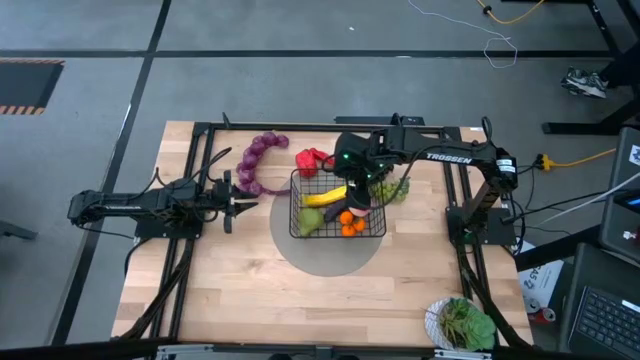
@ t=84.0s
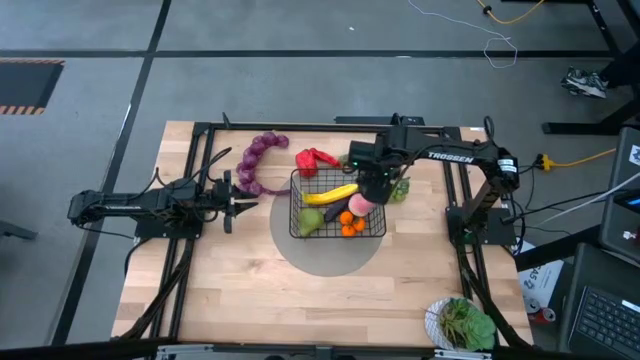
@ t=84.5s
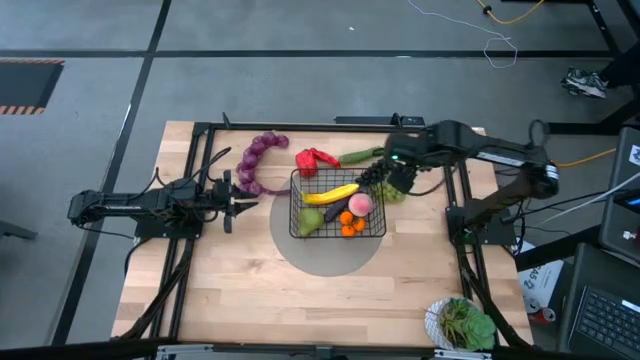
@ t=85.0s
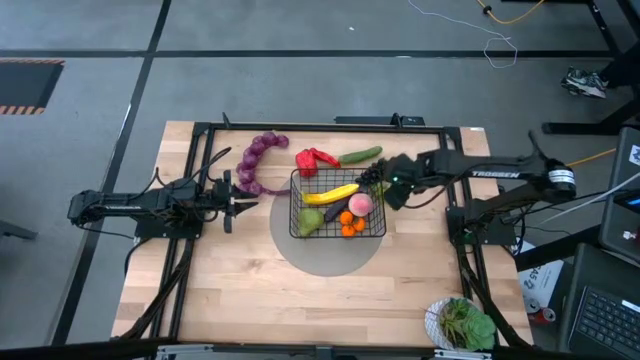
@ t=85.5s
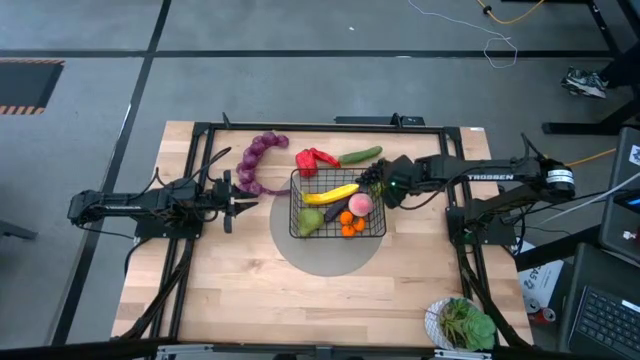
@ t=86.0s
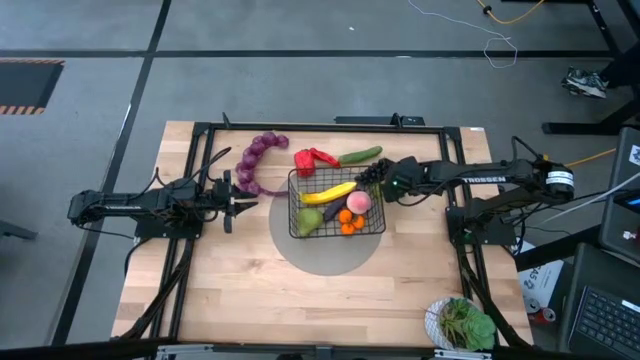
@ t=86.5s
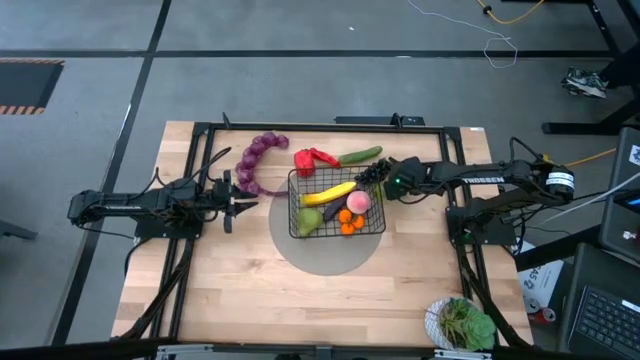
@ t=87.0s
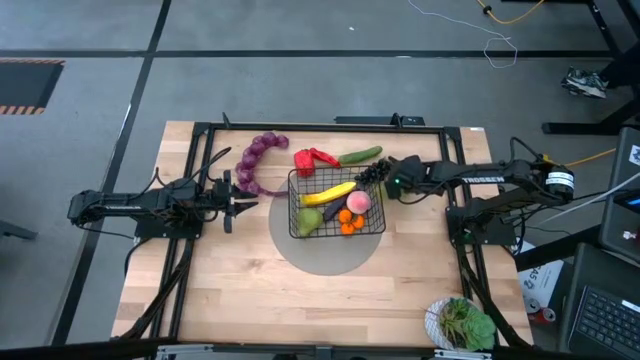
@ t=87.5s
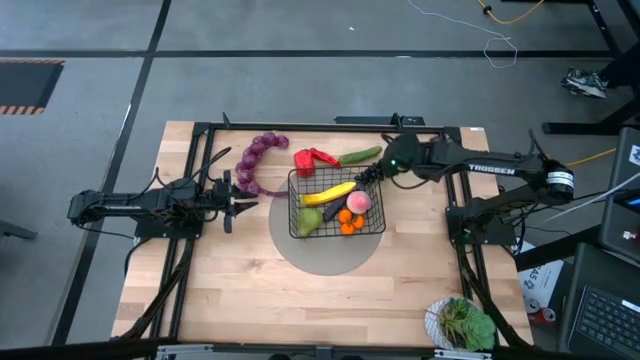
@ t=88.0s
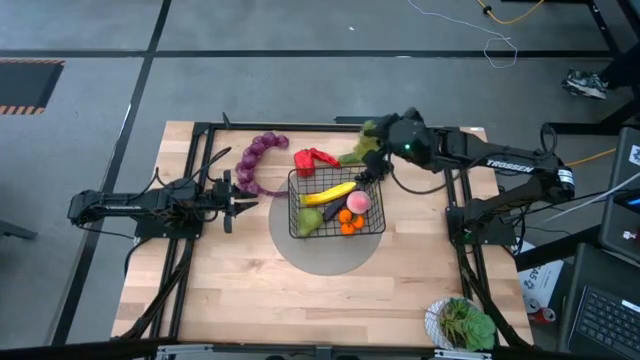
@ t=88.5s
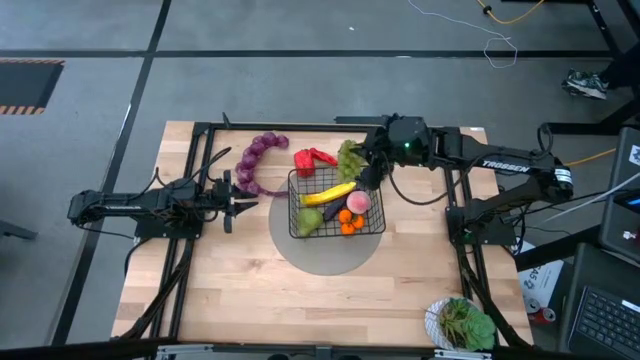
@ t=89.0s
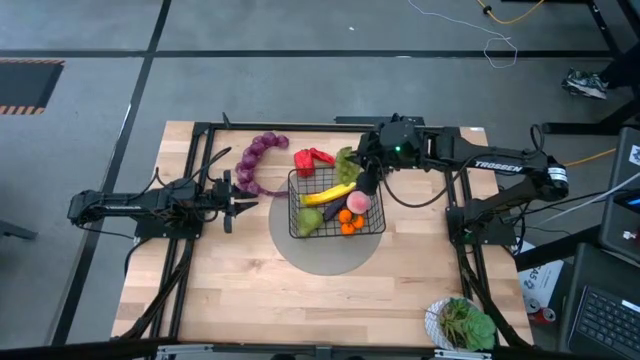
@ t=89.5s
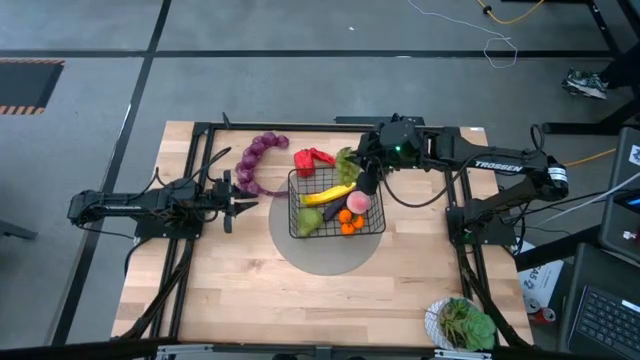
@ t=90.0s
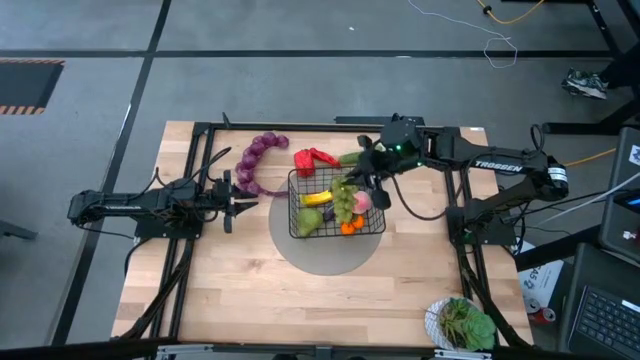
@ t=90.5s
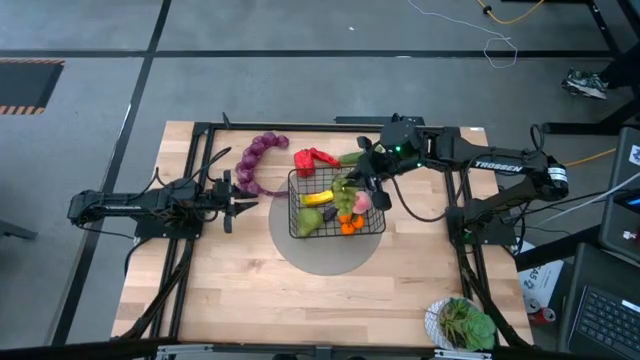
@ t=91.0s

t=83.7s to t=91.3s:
Task: Build produce basket
Put the green grapes into the wire basket

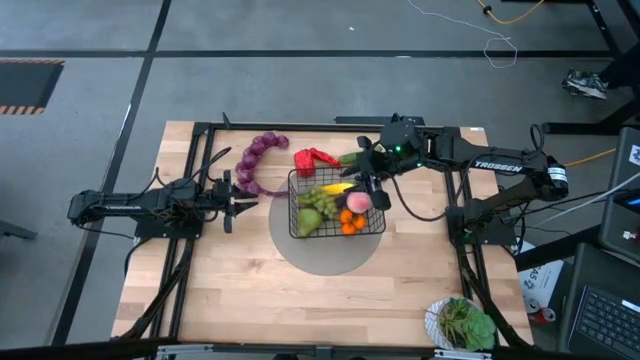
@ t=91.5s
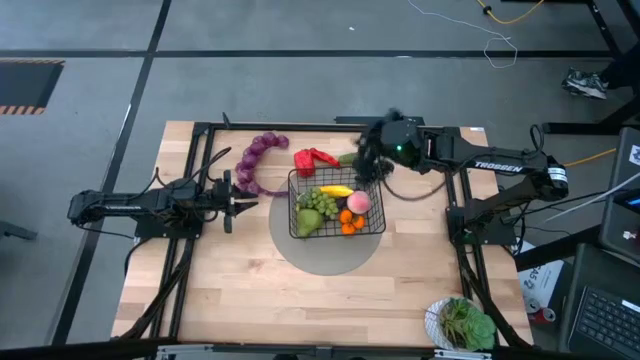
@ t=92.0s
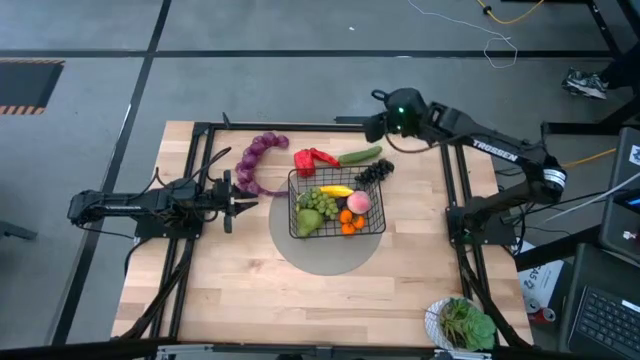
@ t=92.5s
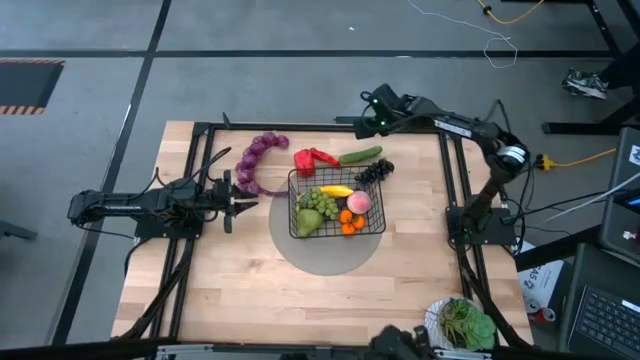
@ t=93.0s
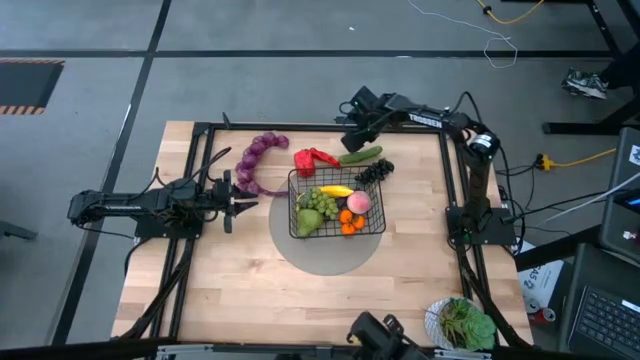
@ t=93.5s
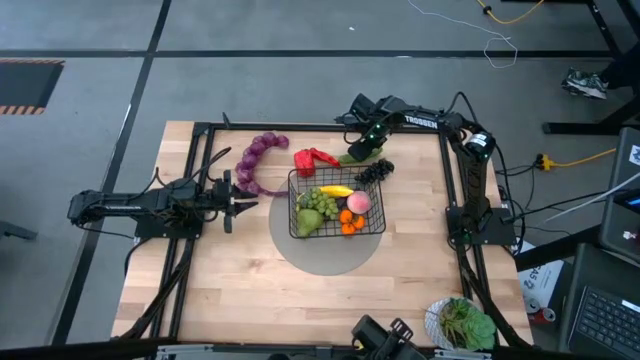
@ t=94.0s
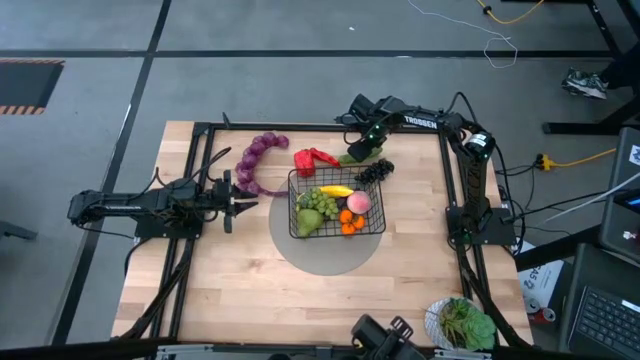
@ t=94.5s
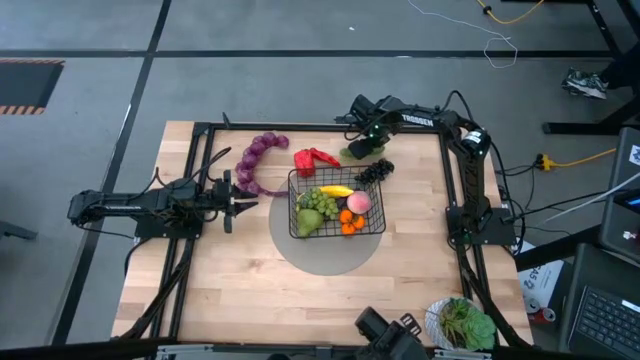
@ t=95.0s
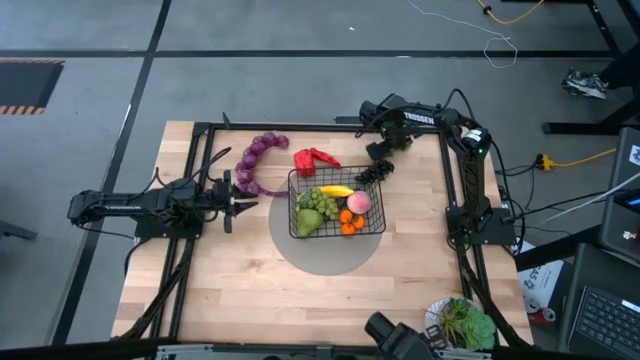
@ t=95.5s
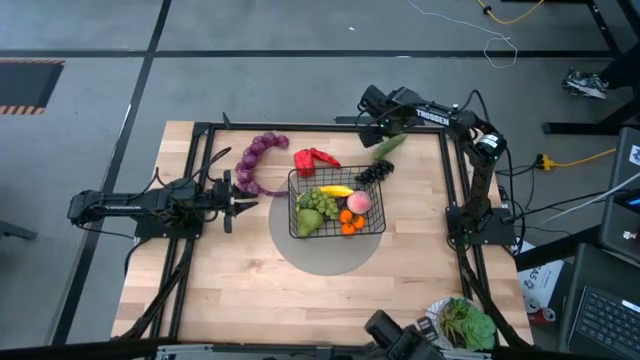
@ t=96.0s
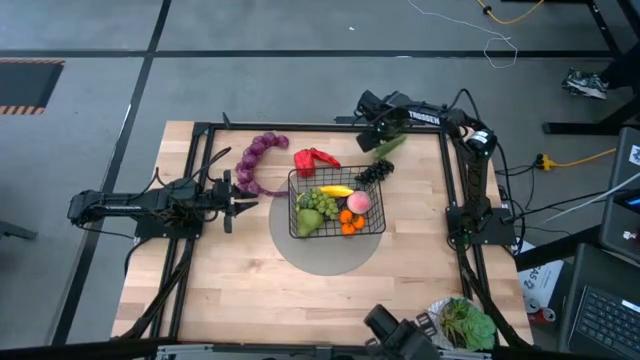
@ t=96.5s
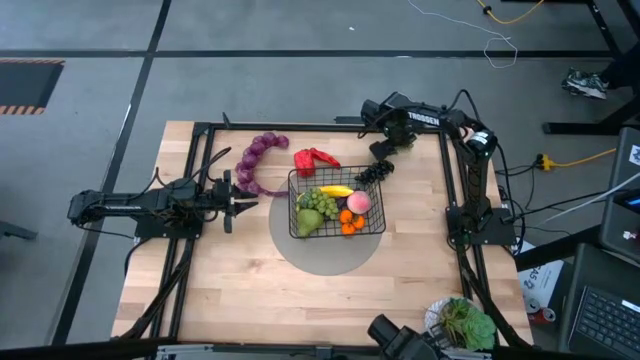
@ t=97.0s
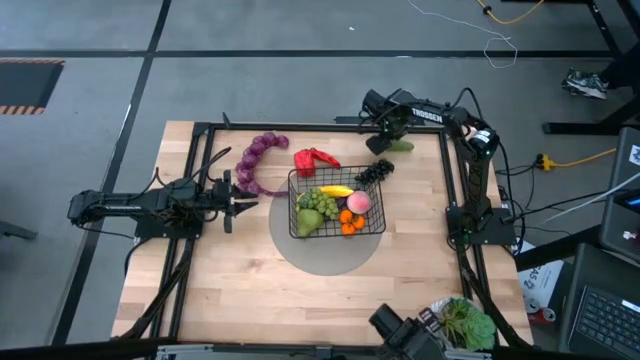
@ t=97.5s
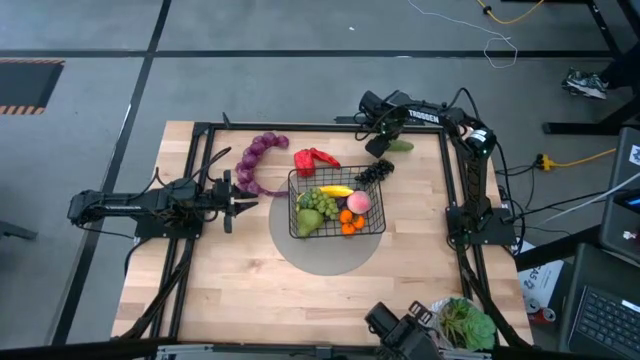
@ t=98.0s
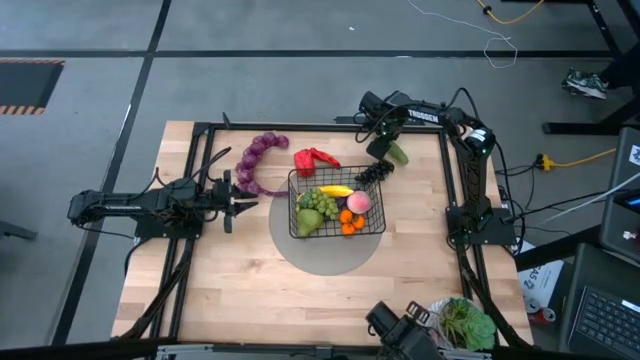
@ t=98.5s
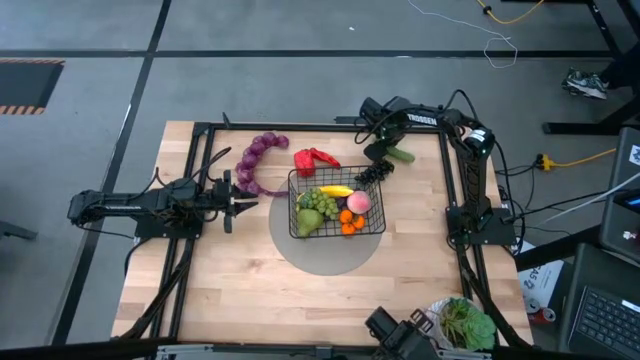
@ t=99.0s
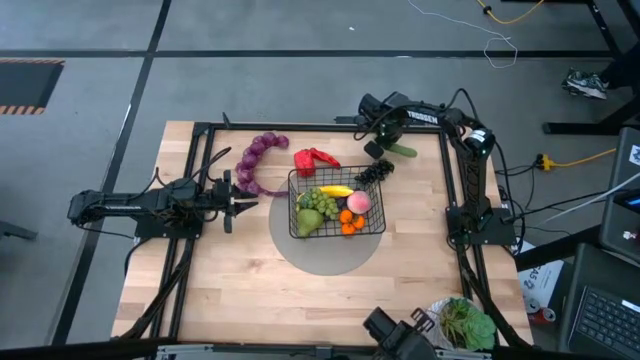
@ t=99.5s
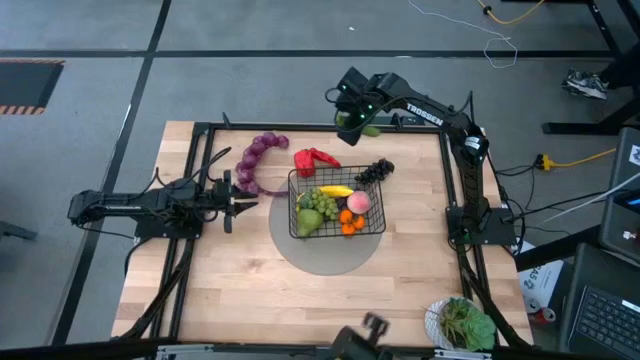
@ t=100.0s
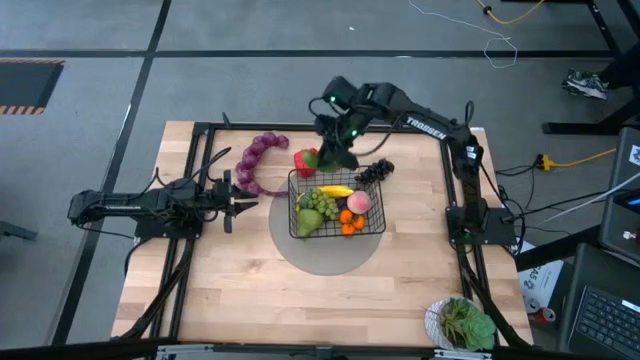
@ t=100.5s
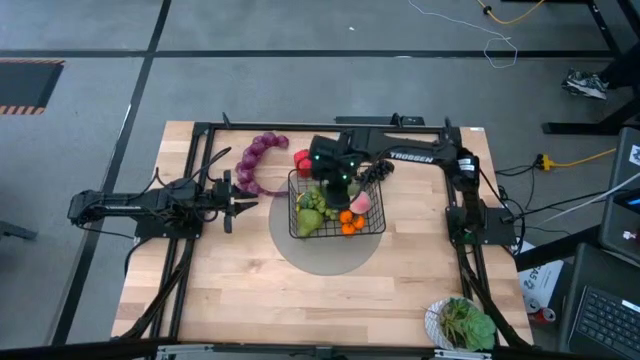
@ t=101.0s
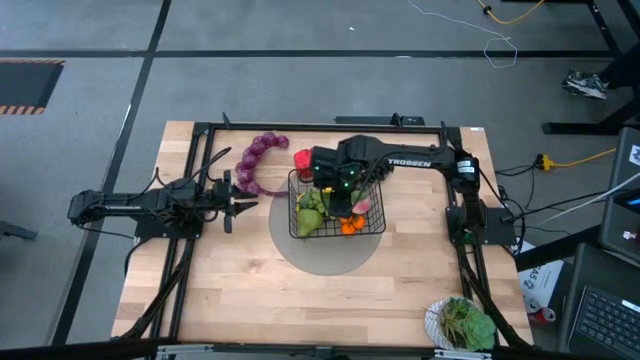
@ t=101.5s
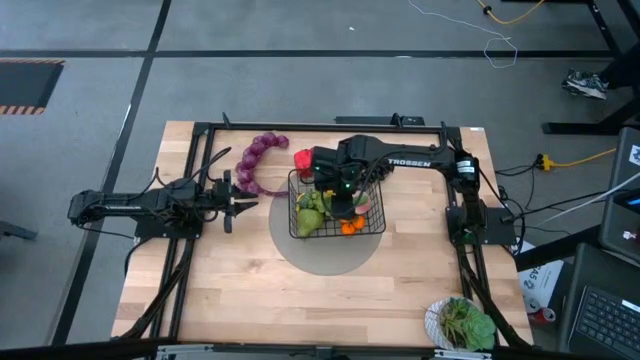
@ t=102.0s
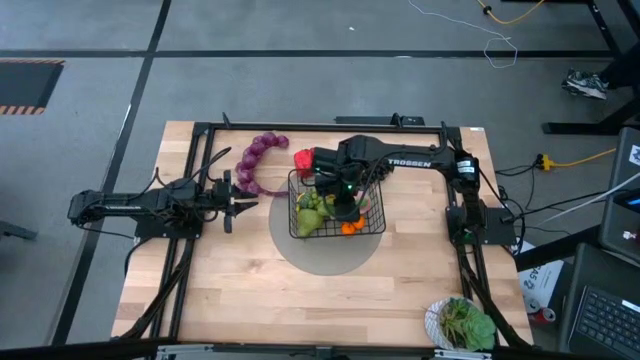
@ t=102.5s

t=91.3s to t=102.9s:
Put the cucumber into the wire basket

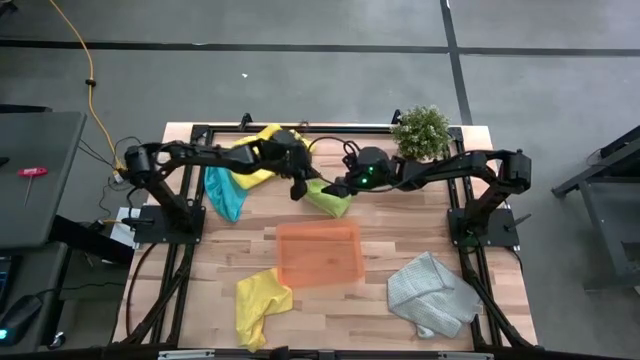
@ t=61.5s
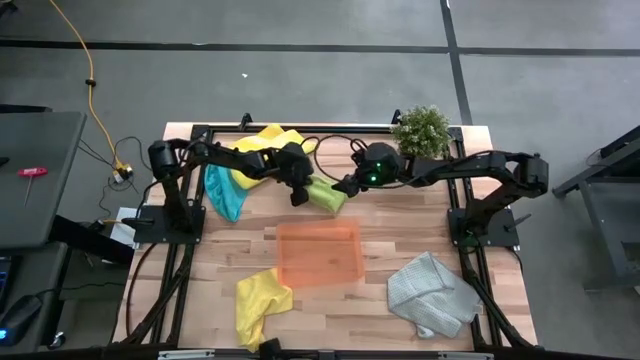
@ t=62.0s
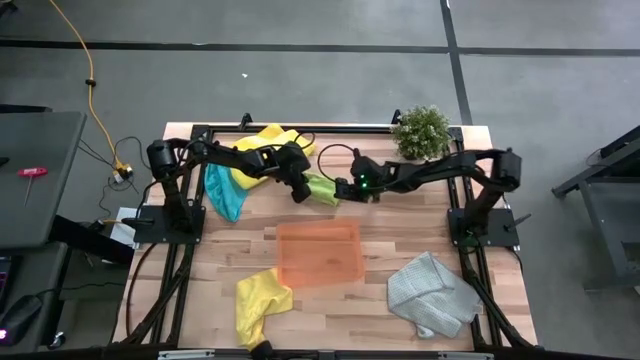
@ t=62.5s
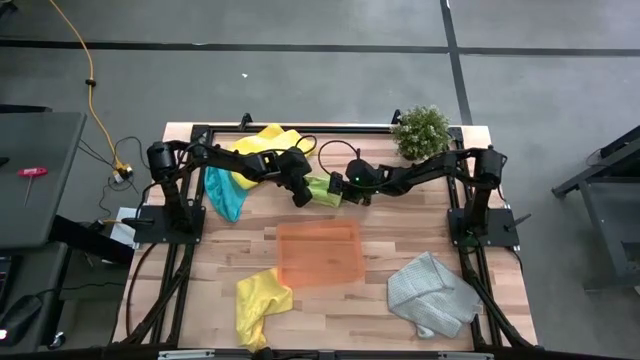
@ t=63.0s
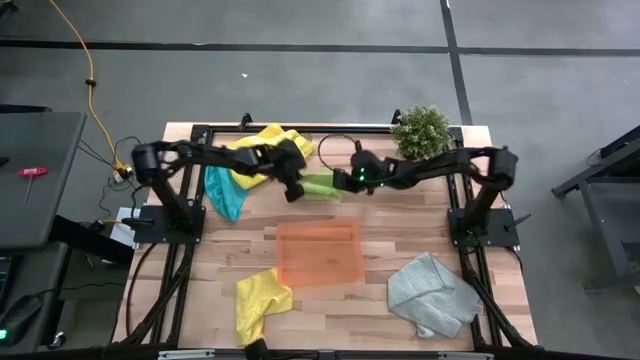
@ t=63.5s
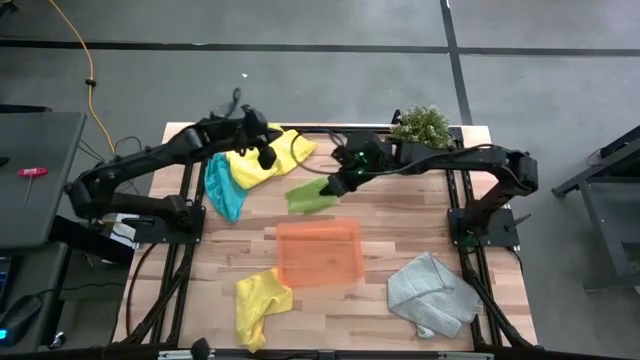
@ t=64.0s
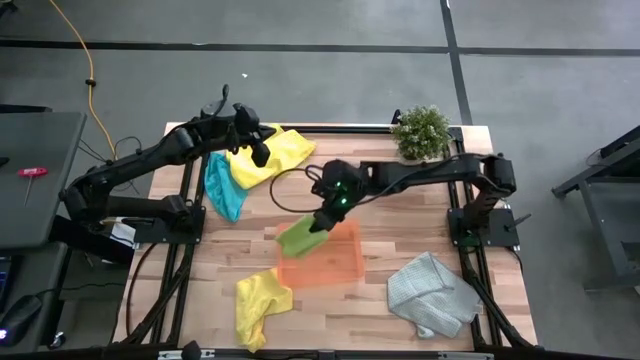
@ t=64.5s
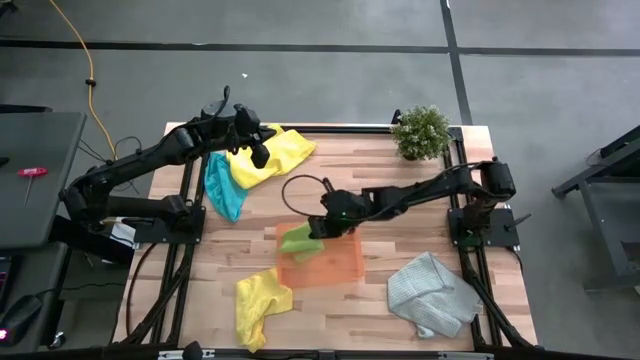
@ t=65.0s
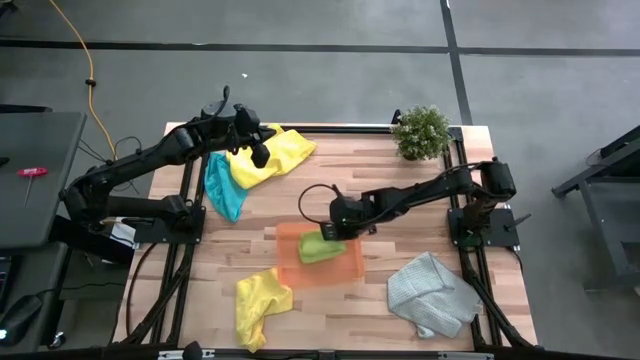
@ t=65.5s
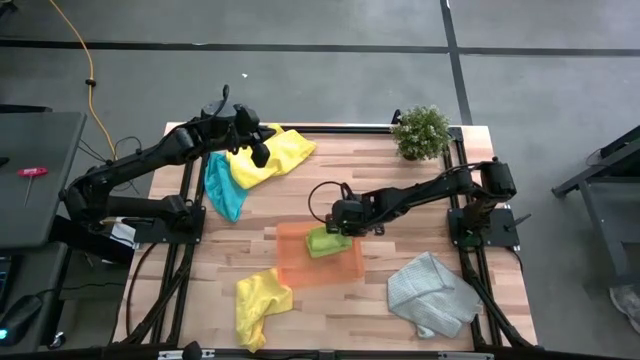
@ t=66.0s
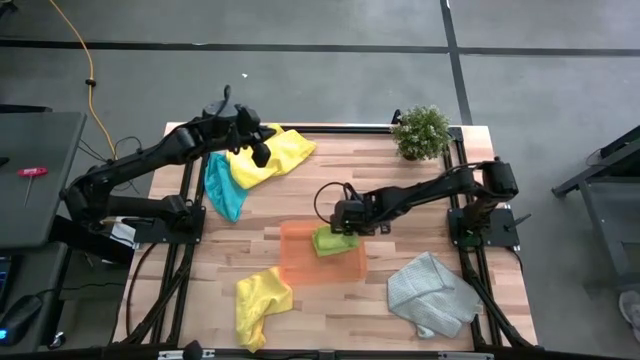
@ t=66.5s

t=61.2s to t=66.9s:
Task: Fold microfiber towels
Put the green towel into the bin
